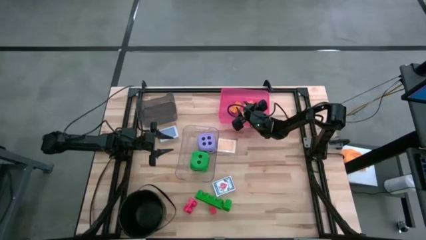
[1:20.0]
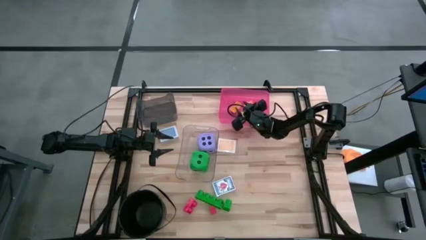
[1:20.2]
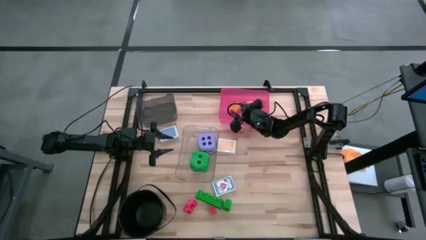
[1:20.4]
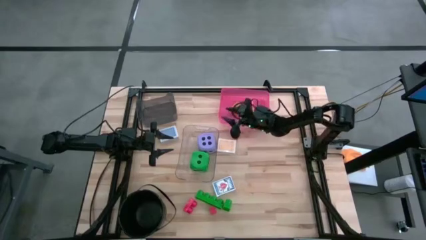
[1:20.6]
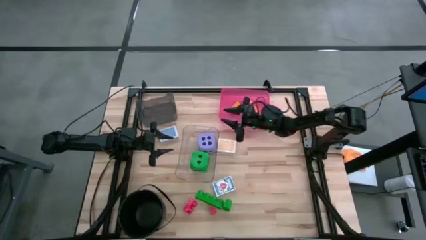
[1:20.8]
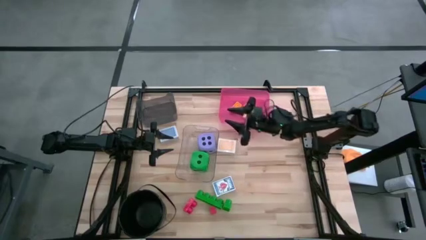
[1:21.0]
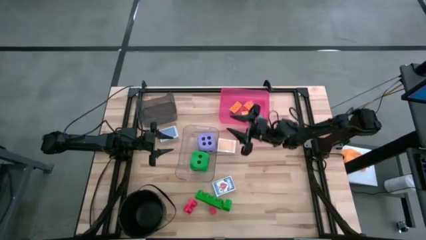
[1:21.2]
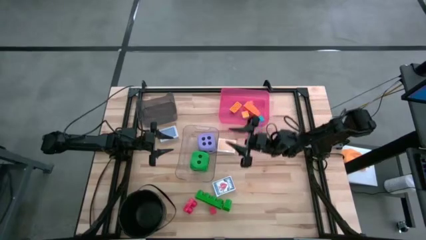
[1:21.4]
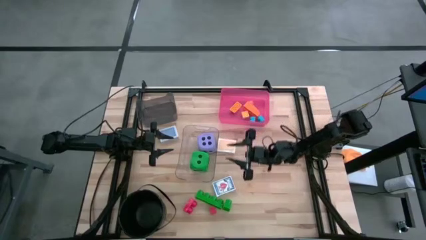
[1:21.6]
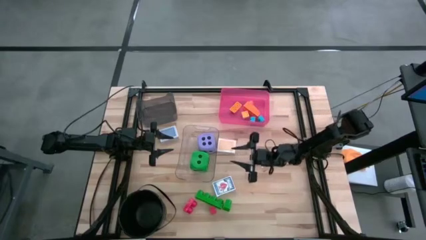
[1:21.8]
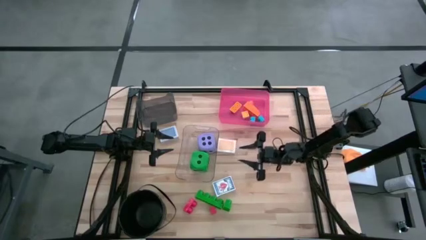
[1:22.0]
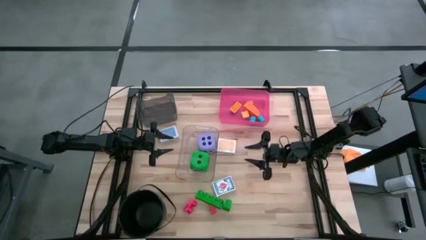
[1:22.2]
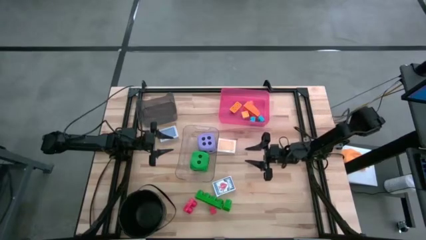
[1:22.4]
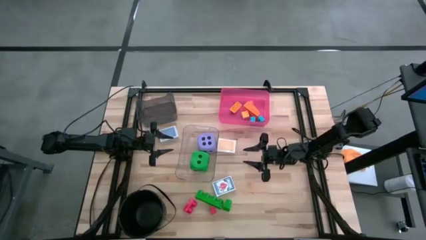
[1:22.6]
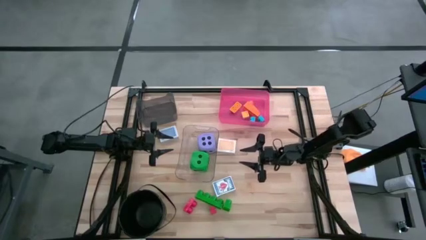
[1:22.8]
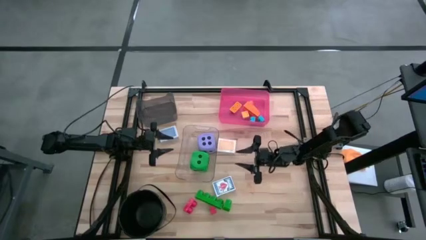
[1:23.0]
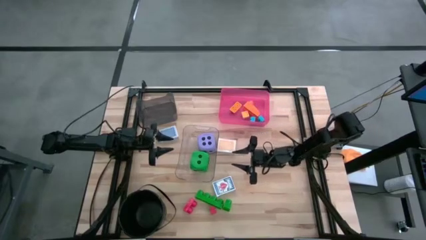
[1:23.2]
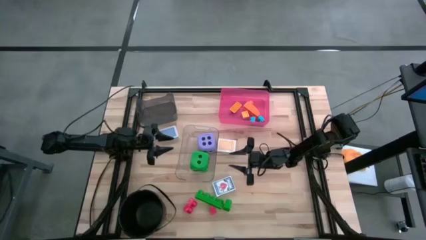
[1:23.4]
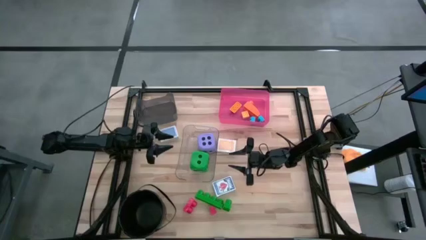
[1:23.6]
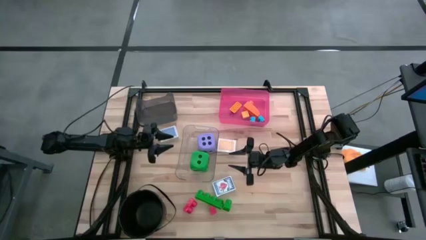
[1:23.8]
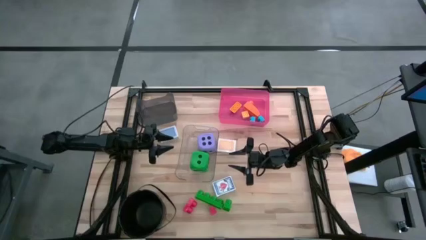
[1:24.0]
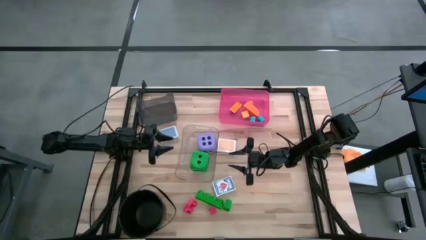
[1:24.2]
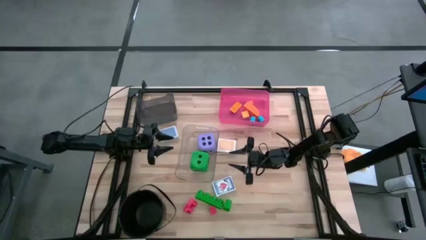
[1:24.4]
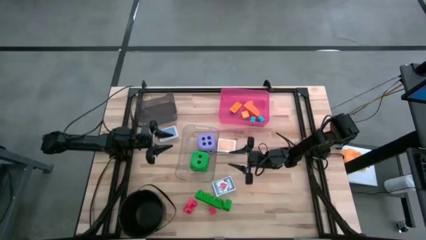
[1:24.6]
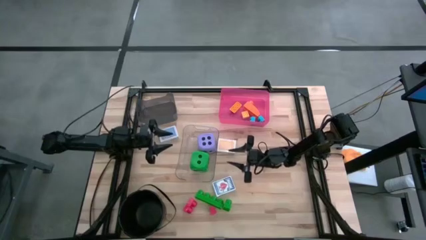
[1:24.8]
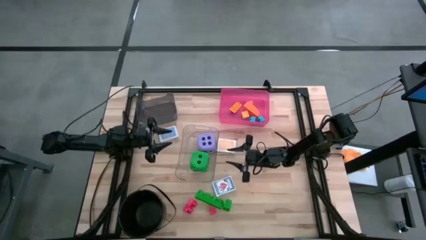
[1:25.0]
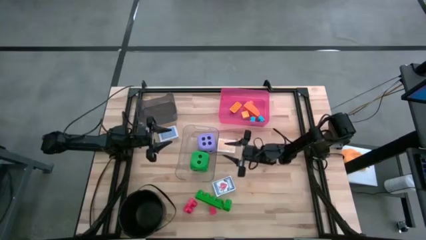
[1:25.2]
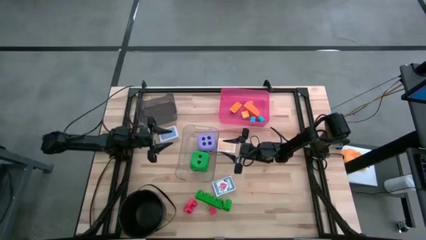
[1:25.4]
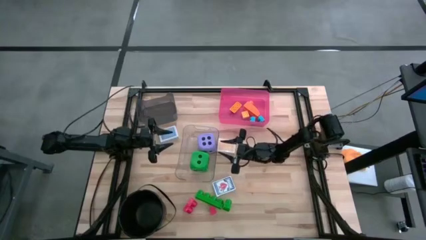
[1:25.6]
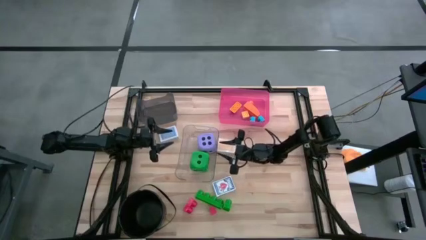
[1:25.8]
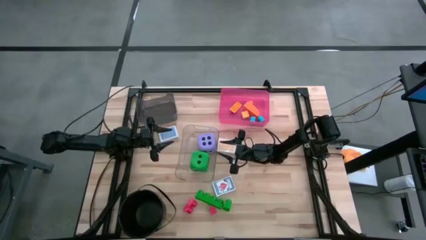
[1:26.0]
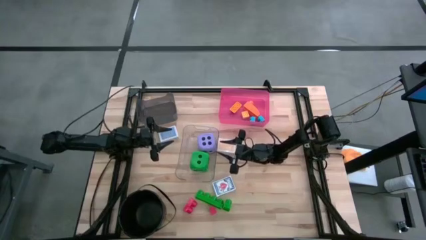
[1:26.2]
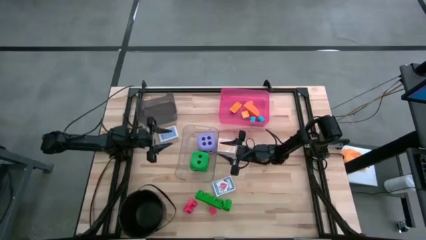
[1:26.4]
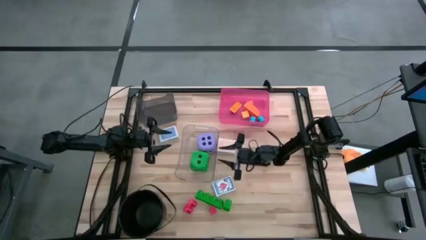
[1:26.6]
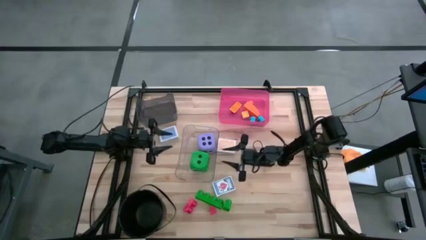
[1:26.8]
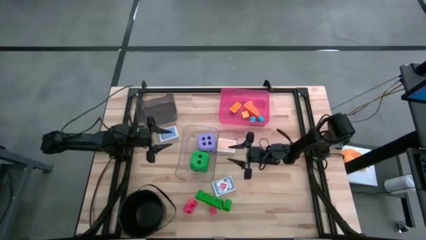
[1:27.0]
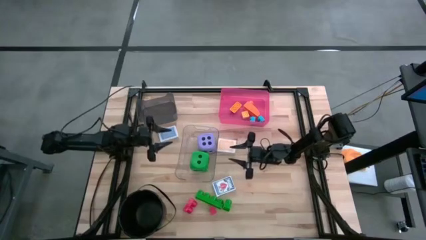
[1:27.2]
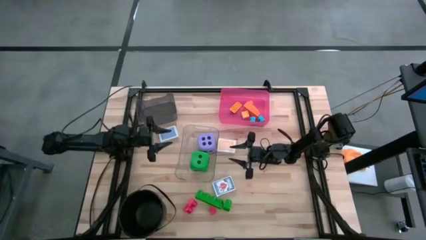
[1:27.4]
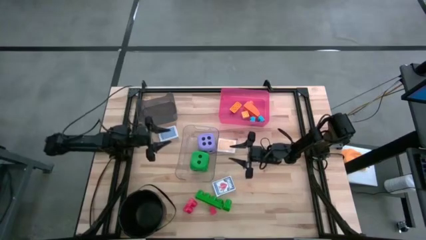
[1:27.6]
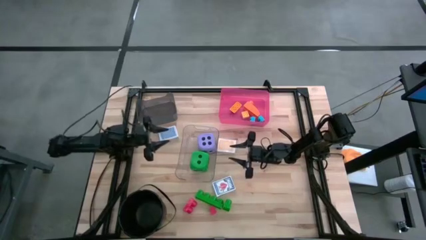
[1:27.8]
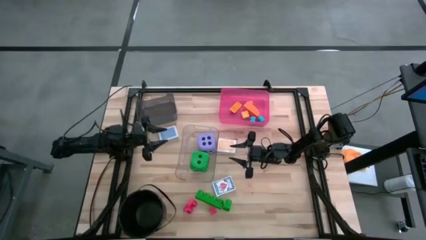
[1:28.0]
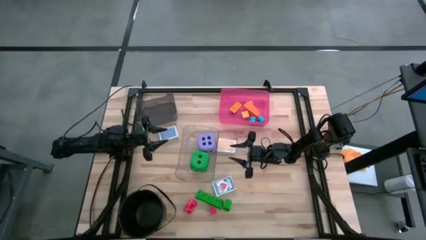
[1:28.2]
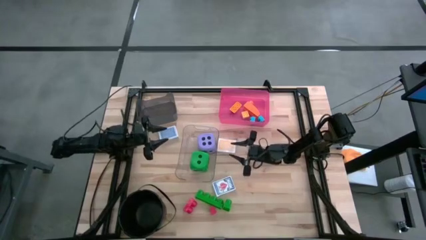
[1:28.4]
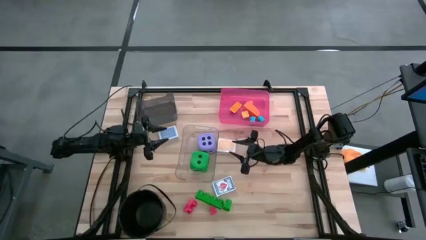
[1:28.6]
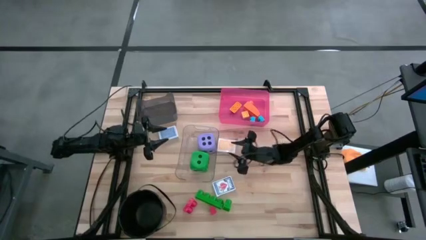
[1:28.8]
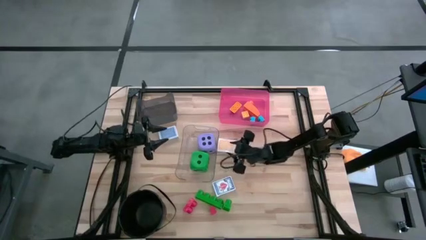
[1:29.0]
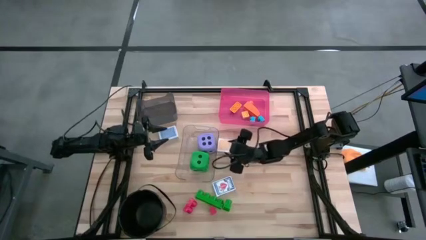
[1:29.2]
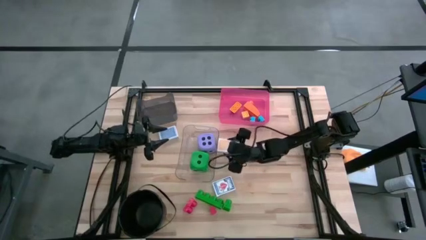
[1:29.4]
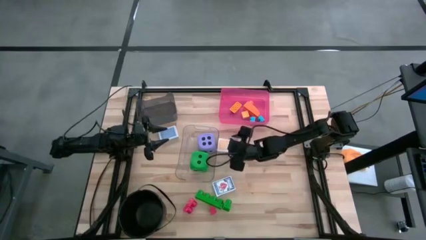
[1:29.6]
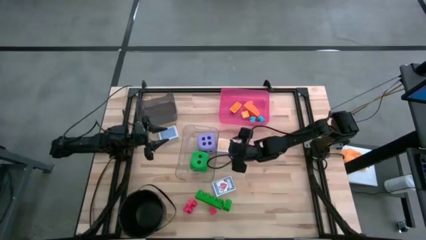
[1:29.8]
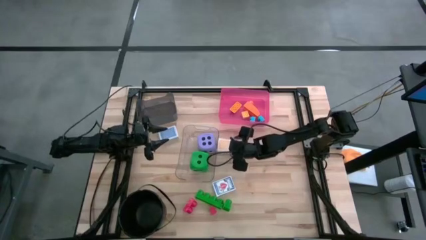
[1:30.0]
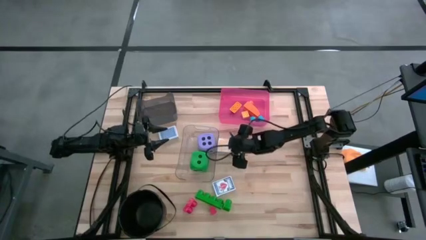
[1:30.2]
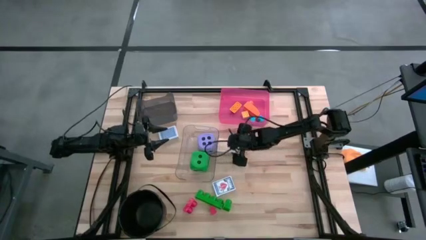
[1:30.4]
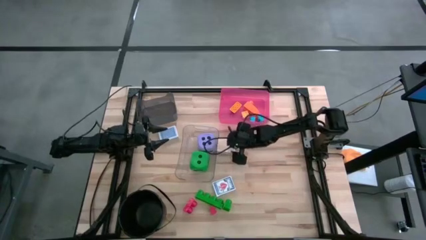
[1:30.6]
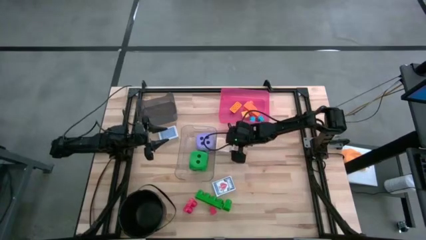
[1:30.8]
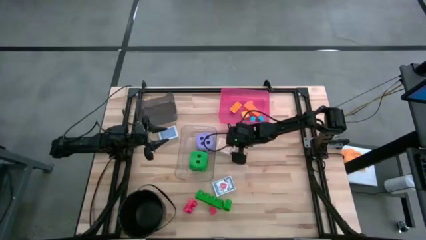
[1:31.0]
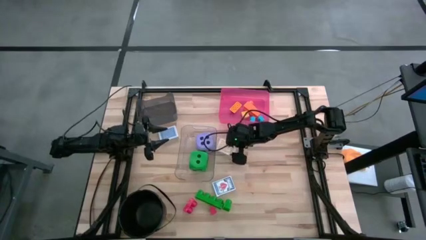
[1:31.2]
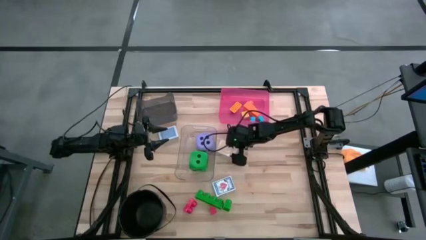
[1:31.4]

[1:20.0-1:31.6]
Task: Pick & Place Toys
Put the yellow deck of cards into the black bin

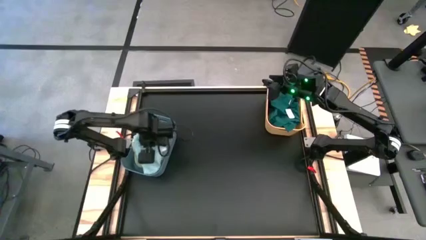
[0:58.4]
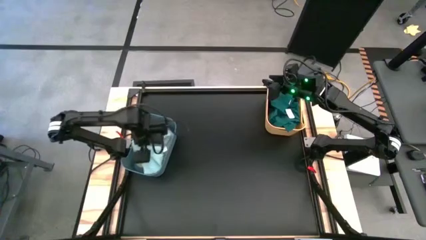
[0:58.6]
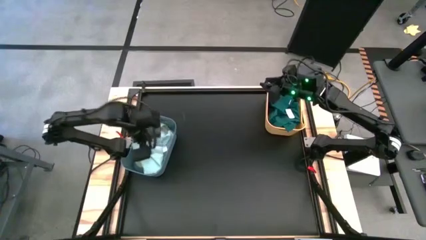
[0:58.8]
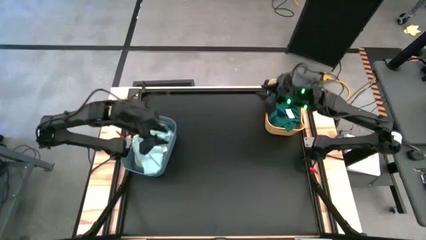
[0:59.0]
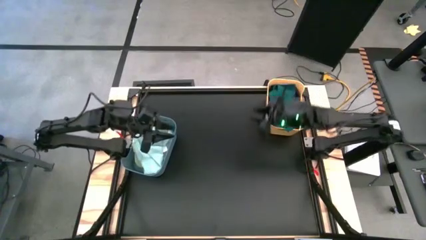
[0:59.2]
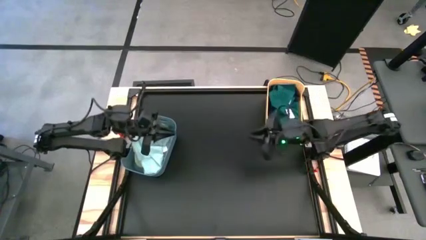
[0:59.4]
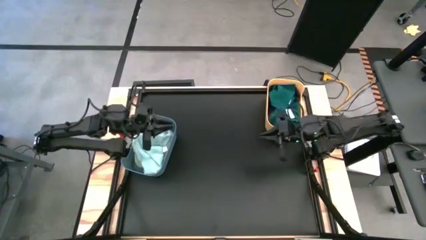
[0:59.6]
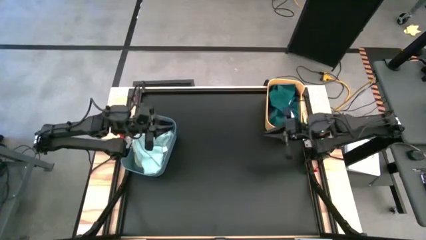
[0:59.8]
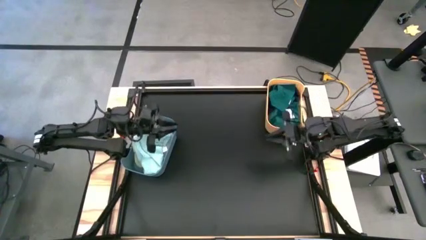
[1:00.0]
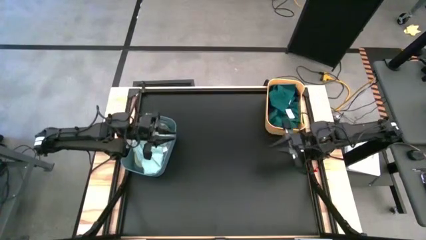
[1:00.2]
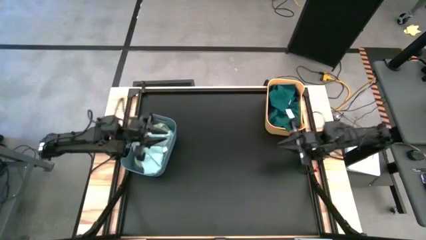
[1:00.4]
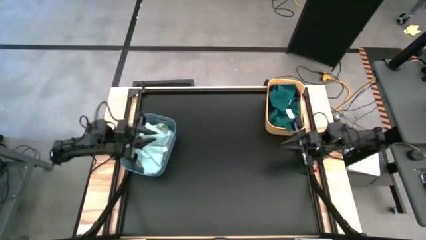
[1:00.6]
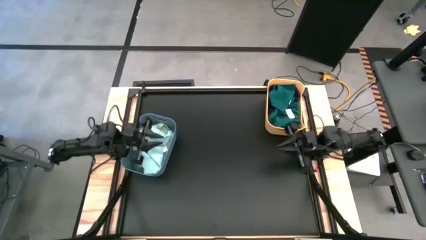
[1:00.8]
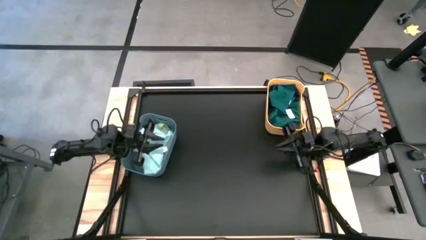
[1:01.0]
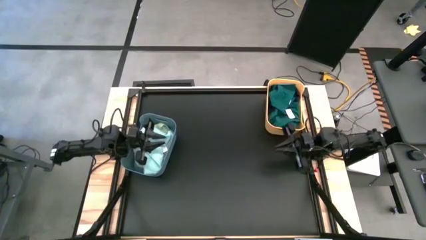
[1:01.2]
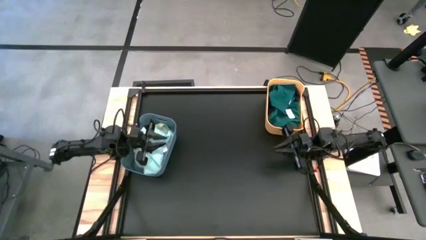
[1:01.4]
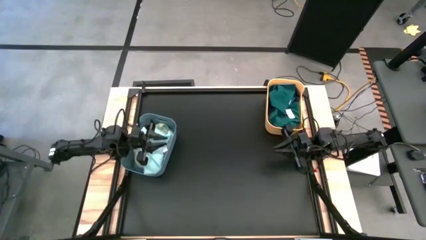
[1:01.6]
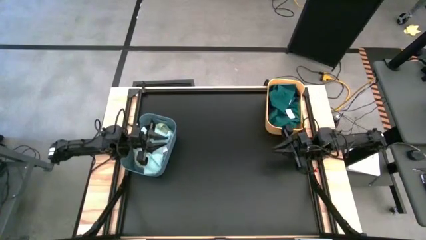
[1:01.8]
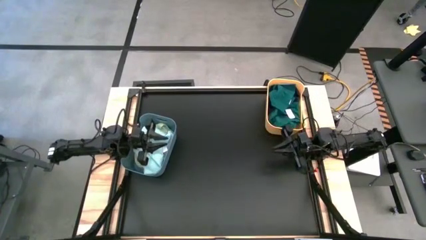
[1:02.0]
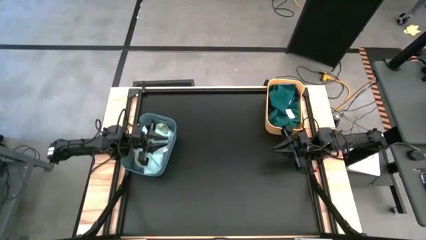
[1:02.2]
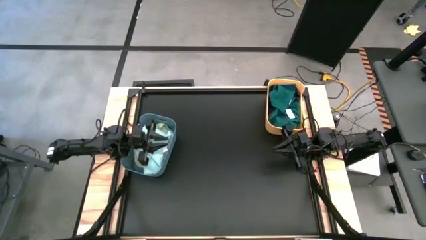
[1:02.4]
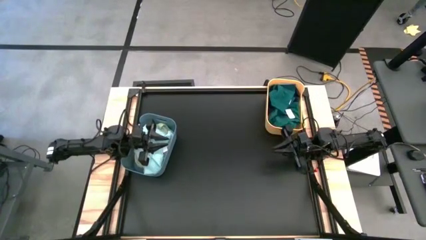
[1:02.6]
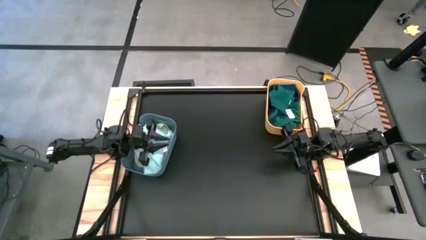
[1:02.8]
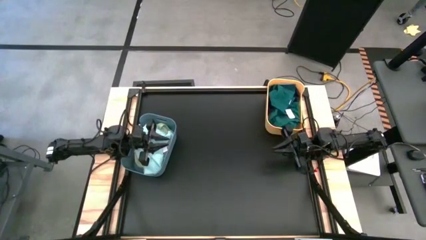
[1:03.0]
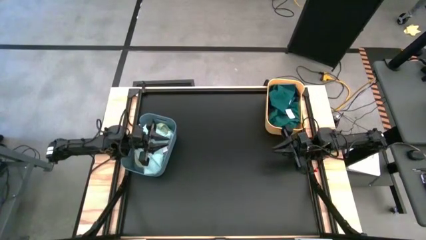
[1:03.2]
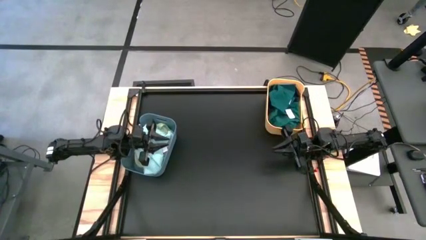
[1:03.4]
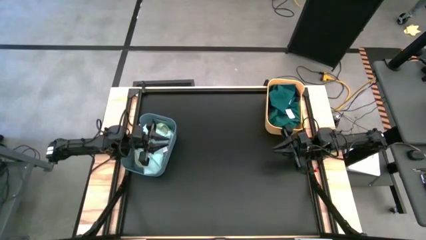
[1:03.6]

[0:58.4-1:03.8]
Task: Sort towels by color in basket
Return to Home Position
